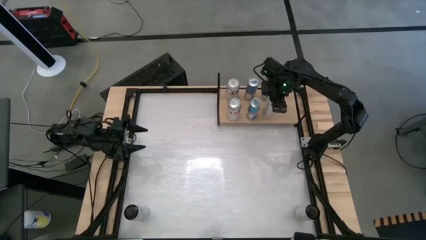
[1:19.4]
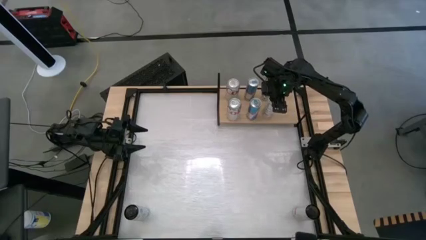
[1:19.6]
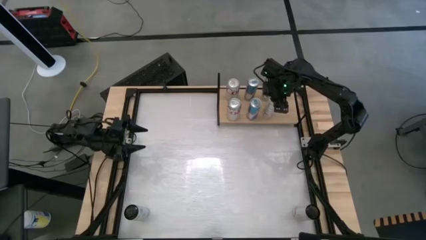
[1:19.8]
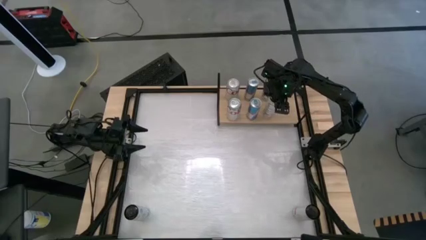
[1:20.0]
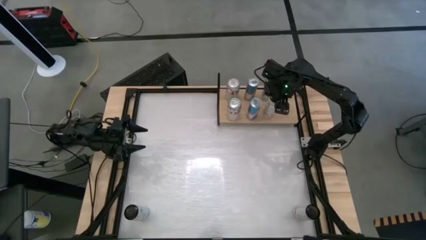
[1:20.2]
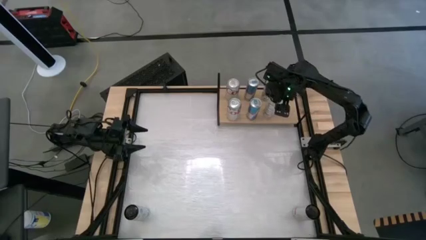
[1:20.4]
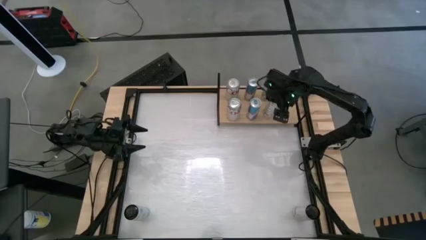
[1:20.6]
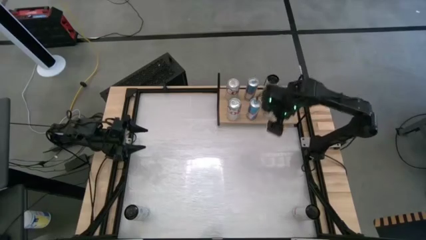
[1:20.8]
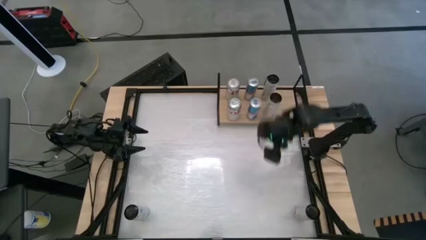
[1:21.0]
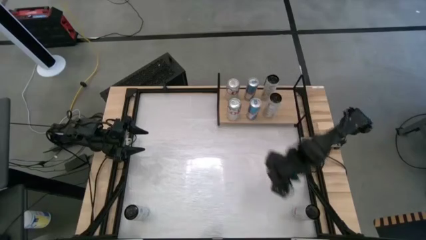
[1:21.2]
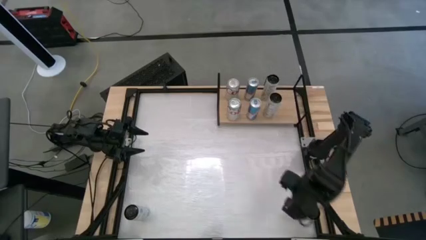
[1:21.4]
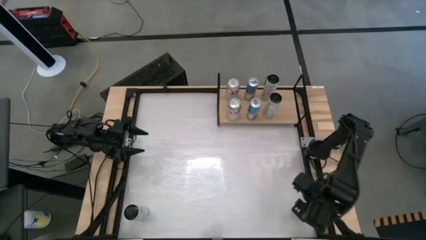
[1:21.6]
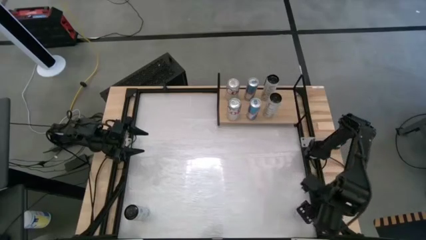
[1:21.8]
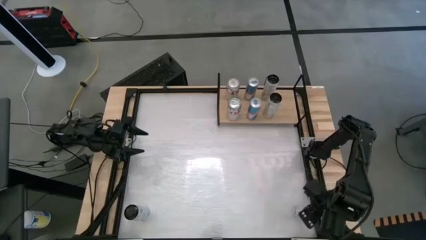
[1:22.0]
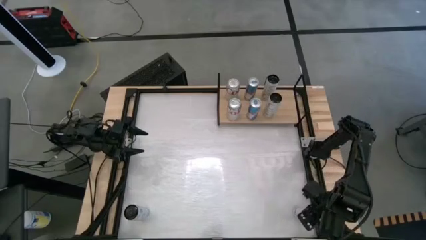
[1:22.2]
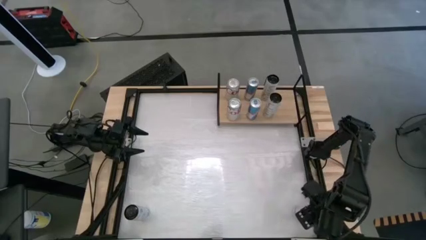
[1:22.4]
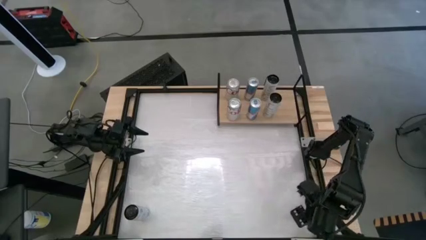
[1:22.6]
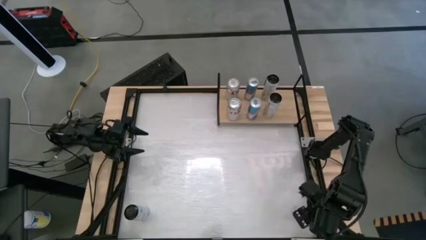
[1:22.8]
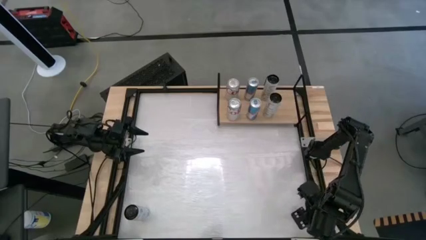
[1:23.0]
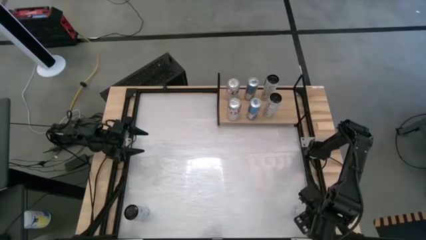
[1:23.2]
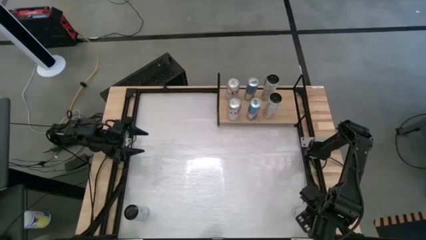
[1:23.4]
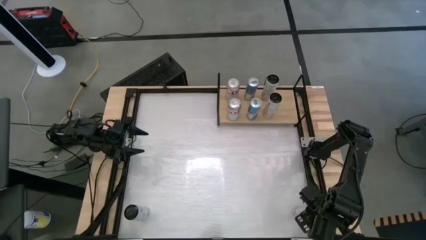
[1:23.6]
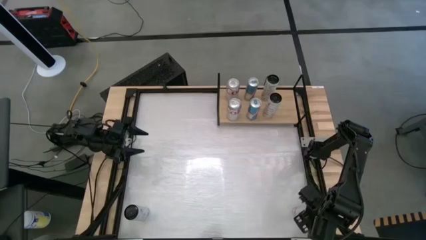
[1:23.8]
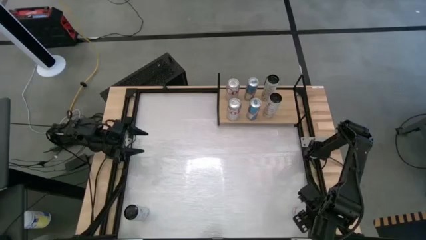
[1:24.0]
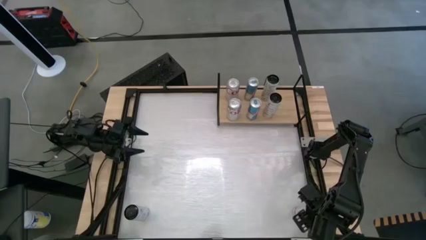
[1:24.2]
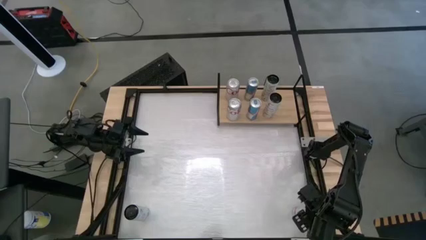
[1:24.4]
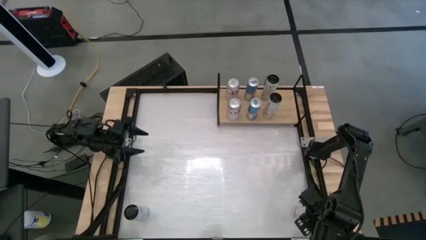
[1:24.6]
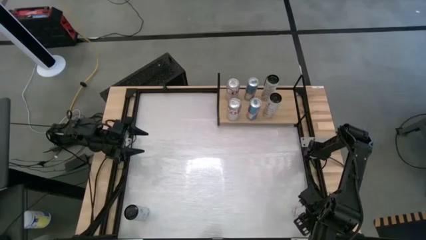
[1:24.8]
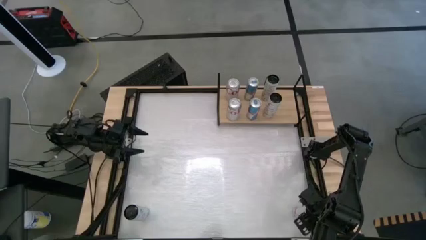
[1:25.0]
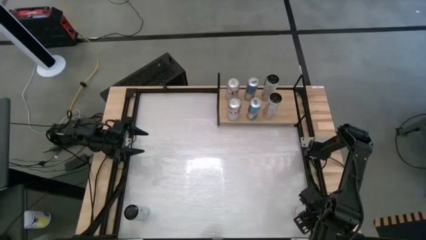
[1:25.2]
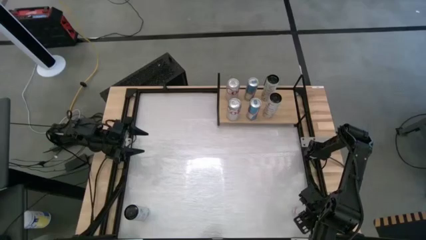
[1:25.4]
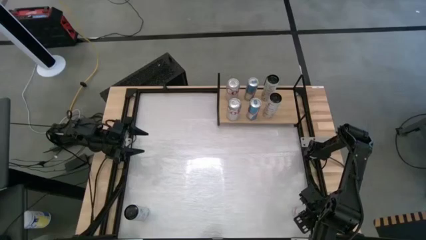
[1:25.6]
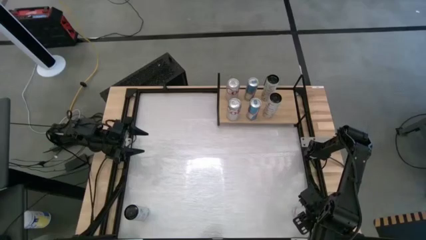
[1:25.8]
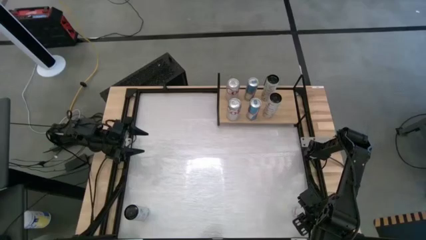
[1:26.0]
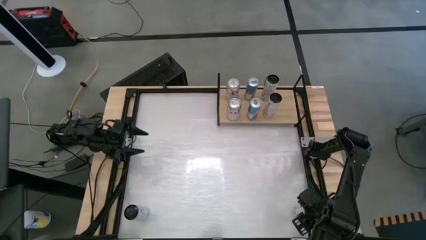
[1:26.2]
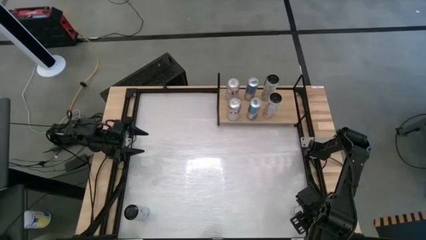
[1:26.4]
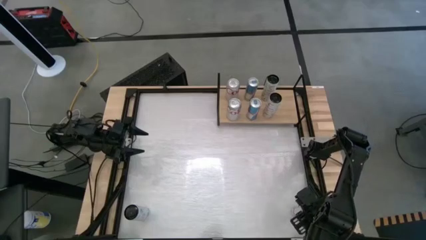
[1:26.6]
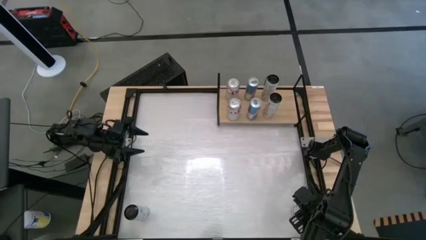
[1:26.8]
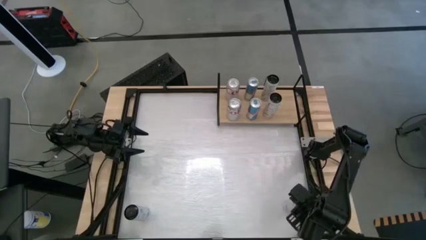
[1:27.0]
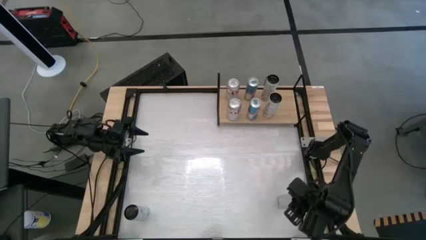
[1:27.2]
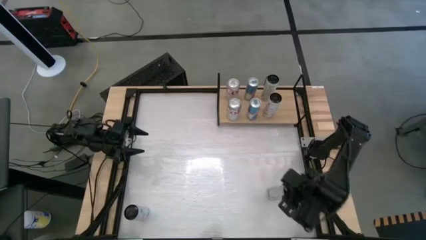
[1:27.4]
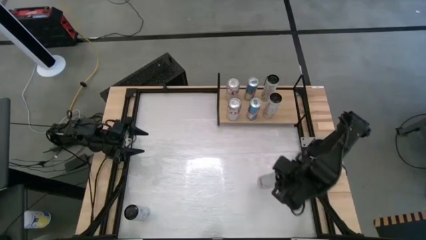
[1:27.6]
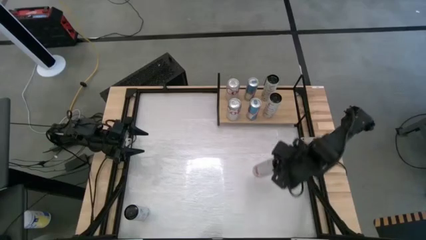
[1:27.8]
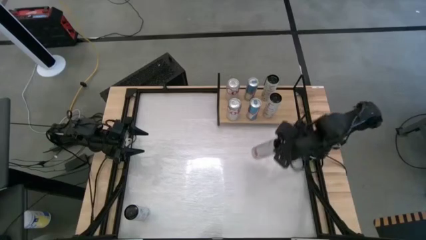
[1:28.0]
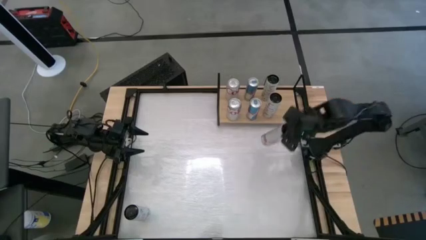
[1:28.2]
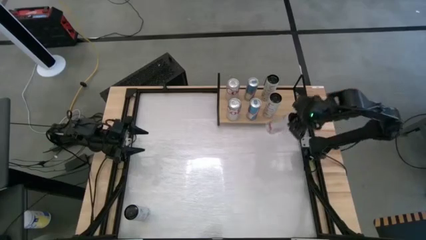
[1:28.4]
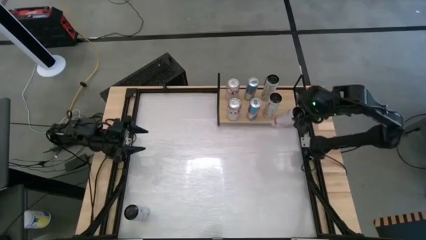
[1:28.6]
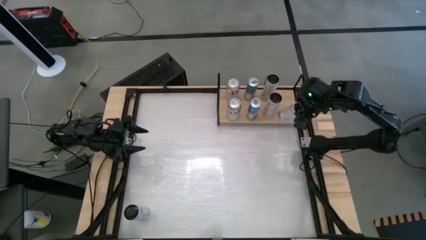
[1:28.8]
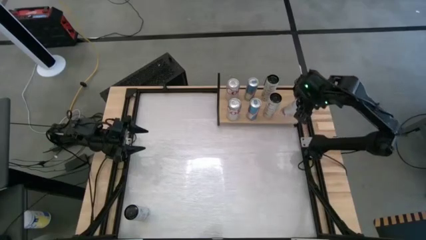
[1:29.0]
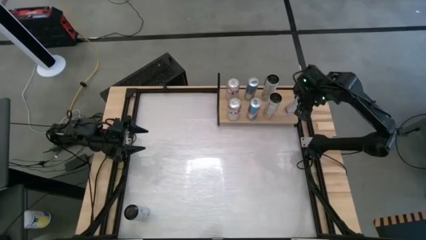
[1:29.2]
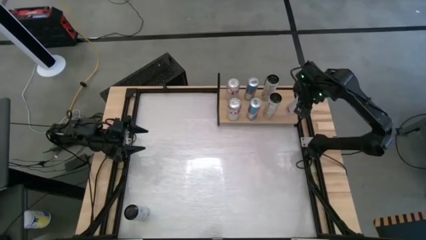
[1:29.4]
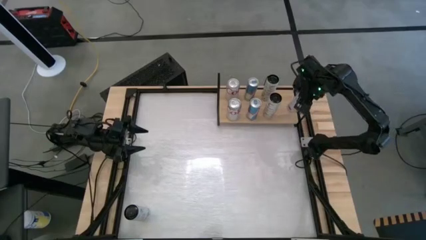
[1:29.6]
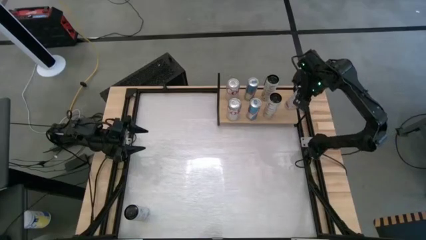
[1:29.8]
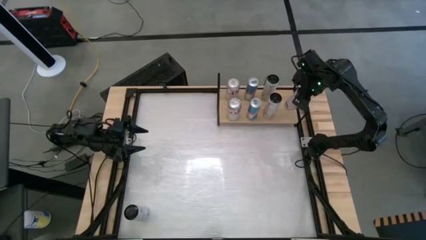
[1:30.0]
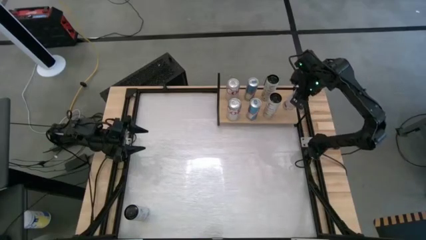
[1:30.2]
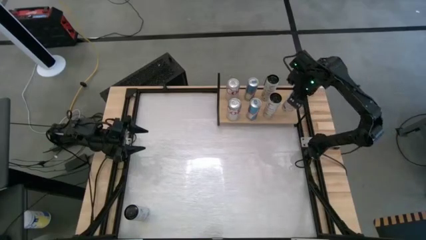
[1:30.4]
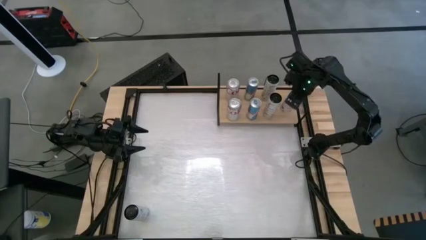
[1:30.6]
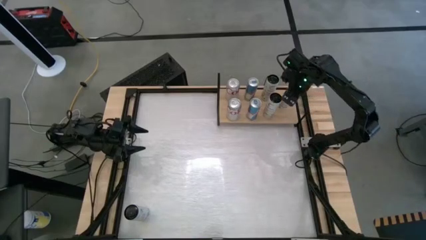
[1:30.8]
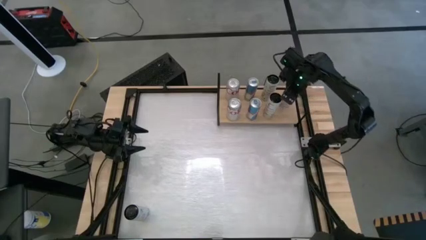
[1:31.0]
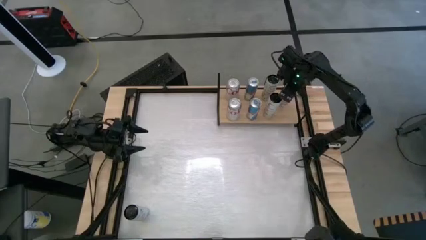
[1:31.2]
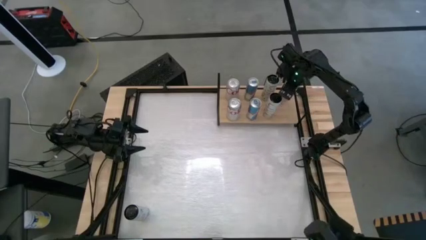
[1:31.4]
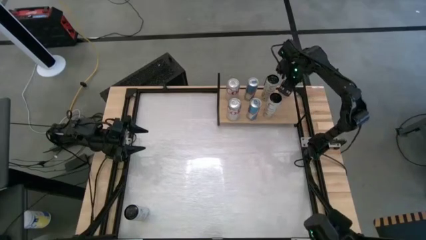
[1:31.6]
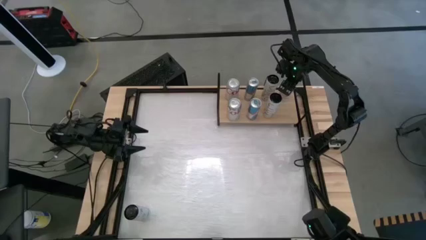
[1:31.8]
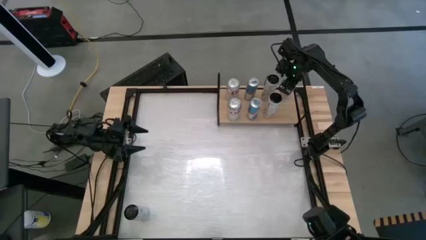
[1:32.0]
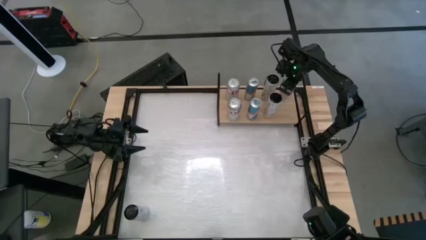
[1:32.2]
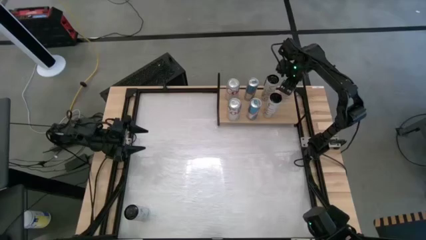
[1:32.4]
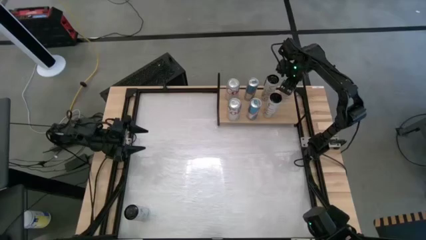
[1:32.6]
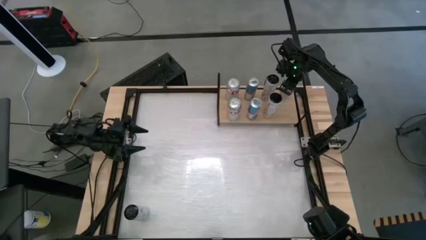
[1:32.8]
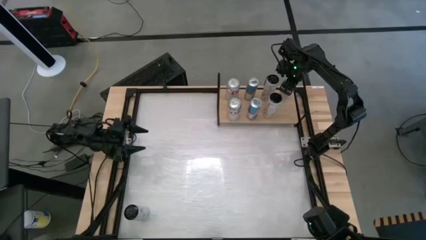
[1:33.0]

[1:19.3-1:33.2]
Task: Place canned beverage on shelf
Put the right black can on the shelf

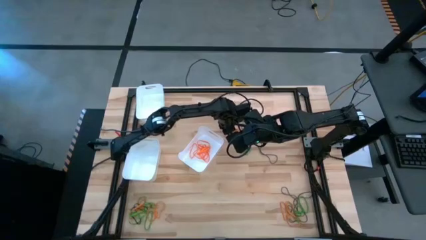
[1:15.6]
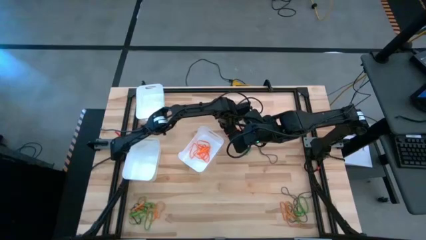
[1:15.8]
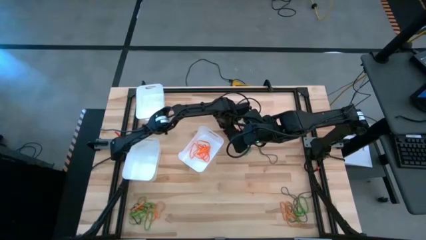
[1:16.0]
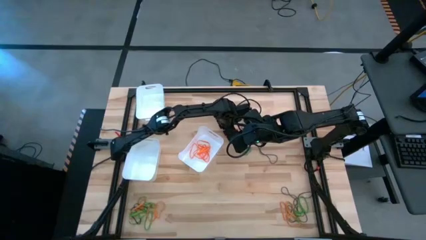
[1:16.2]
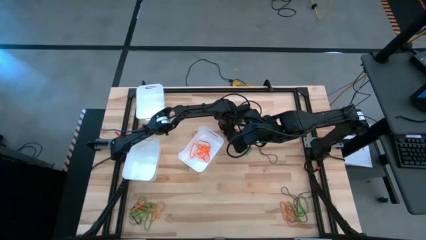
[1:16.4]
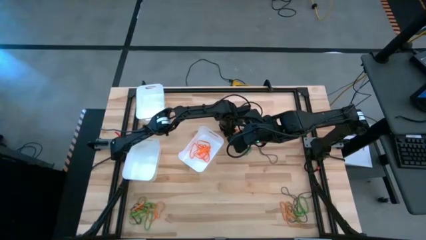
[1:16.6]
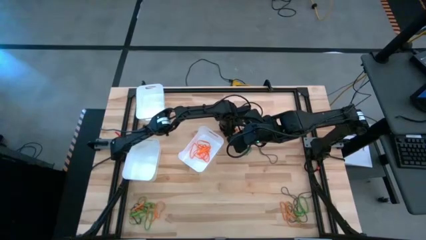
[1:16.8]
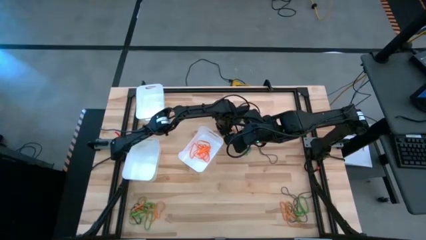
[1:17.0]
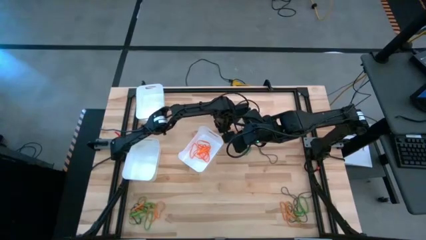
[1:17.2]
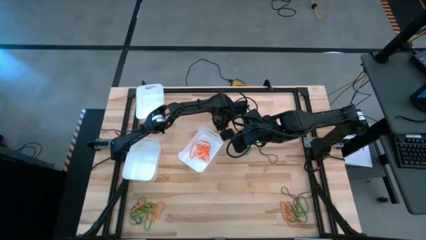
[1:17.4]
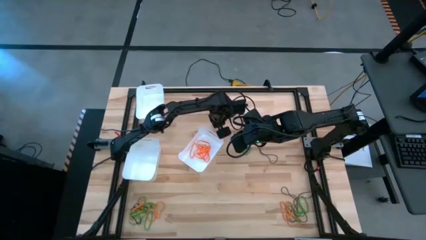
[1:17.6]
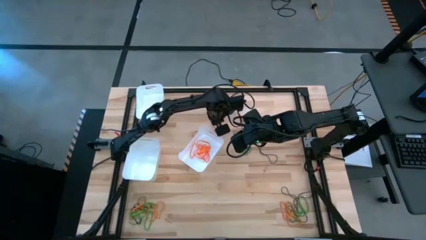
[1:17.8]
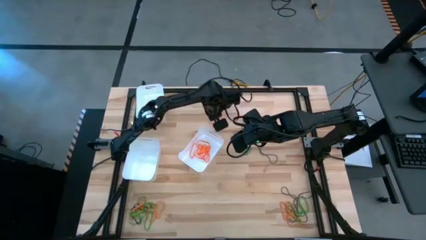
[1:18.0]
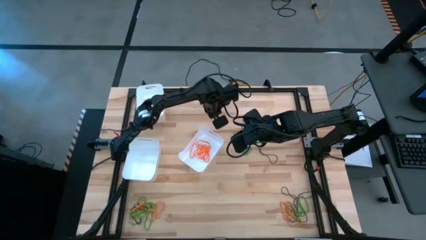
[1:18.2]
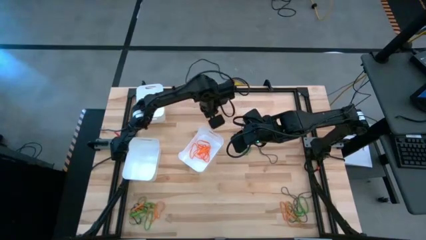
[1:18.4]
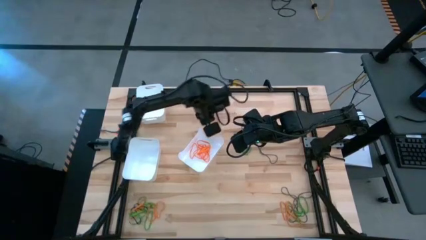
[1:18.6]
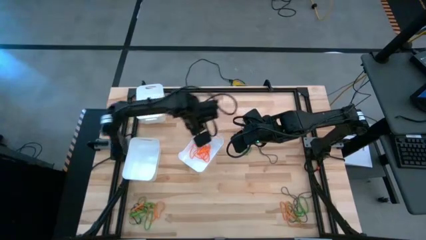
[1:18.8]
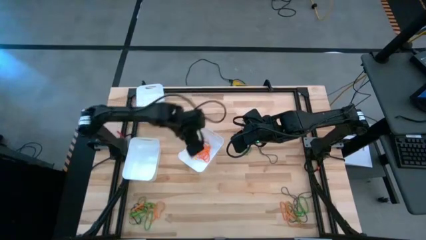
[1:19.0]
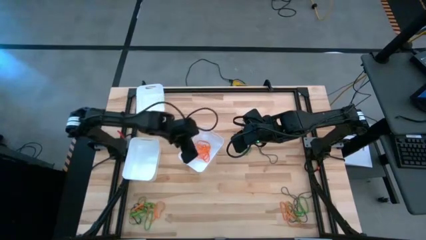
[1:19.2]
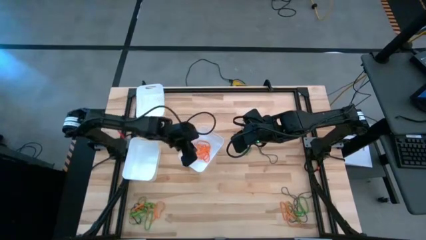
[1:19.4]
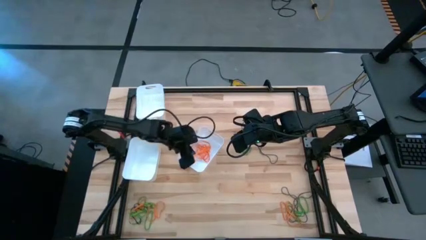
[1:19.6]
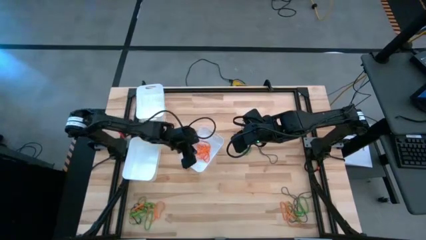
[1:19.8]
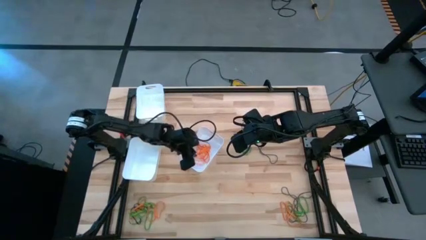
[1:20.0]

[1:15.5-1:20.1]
Task: Sort rubber bands into baskets
Put the orange rubber band into the bottom right white bin
